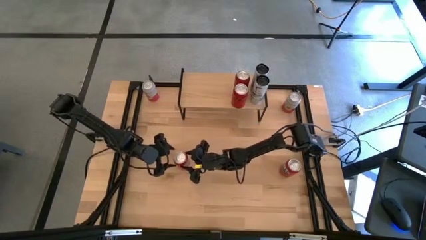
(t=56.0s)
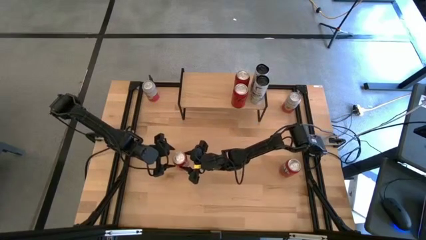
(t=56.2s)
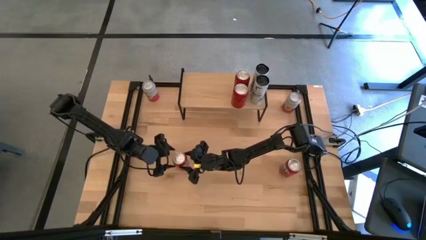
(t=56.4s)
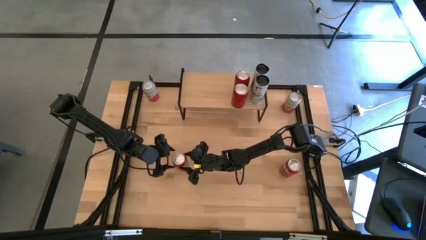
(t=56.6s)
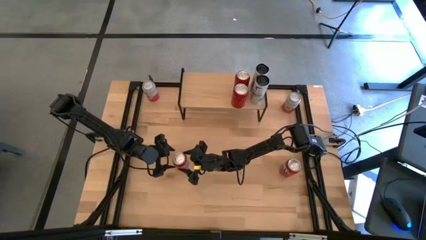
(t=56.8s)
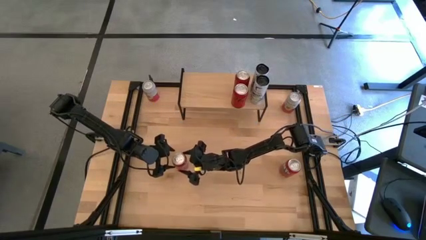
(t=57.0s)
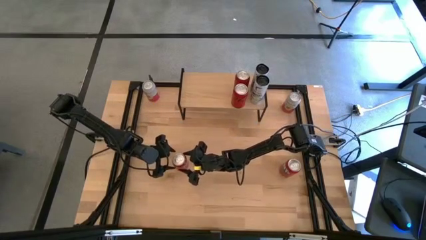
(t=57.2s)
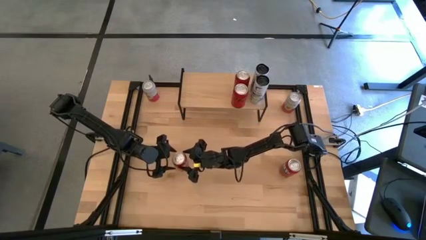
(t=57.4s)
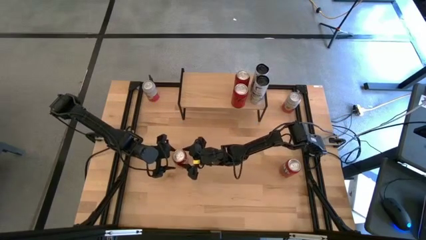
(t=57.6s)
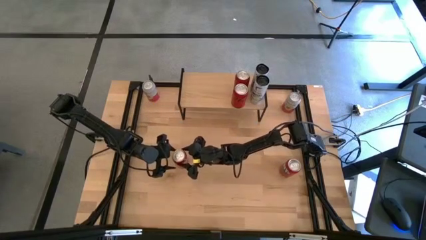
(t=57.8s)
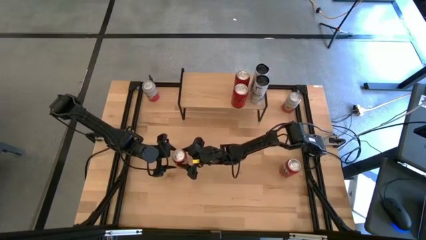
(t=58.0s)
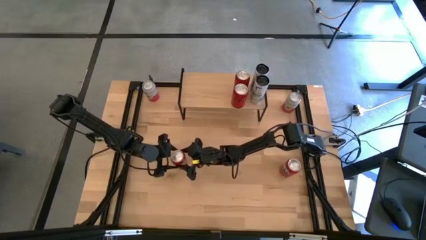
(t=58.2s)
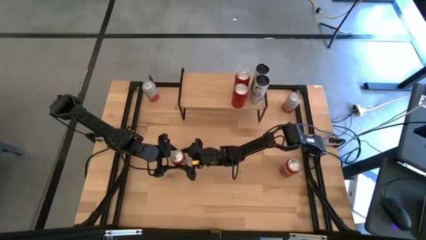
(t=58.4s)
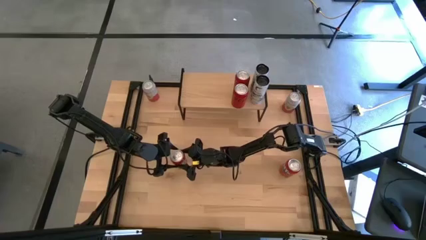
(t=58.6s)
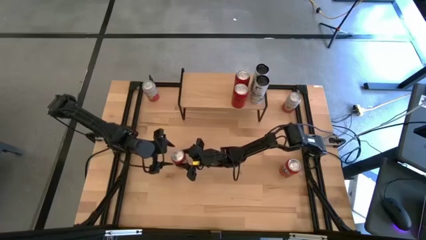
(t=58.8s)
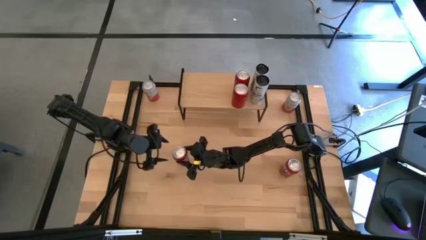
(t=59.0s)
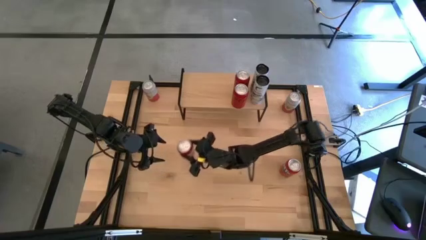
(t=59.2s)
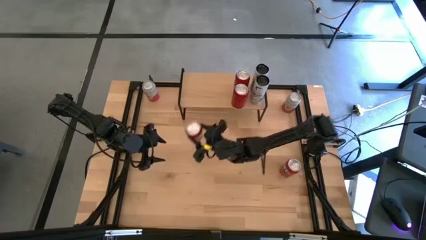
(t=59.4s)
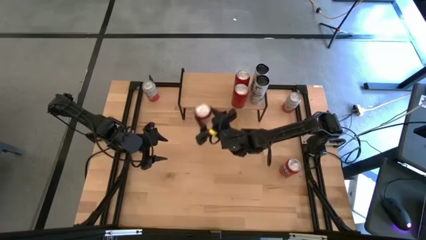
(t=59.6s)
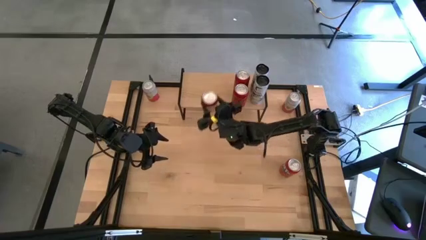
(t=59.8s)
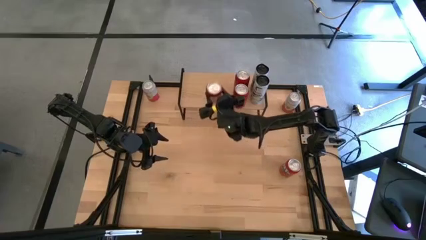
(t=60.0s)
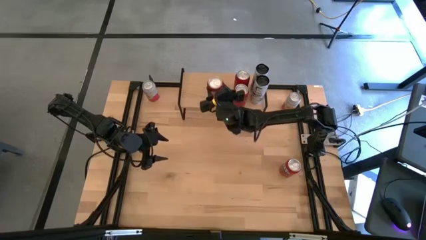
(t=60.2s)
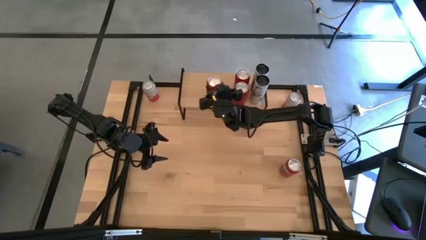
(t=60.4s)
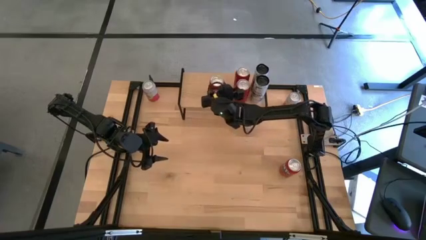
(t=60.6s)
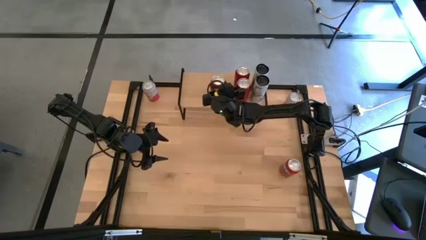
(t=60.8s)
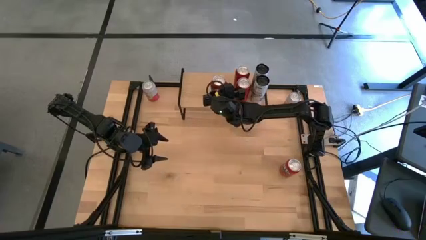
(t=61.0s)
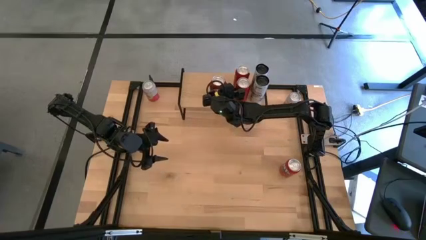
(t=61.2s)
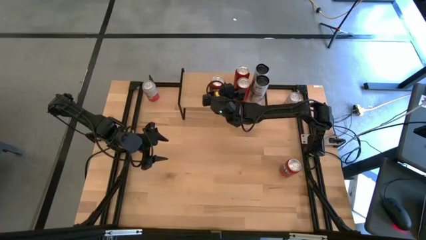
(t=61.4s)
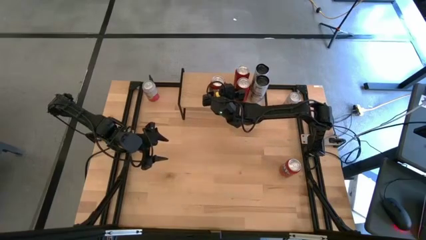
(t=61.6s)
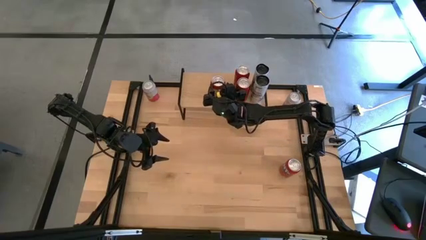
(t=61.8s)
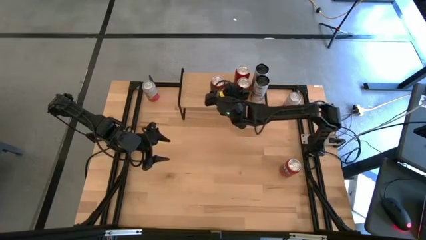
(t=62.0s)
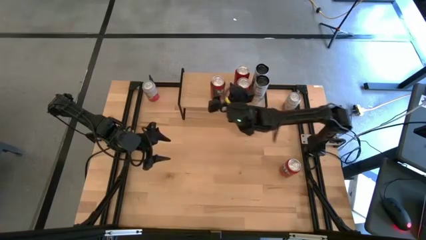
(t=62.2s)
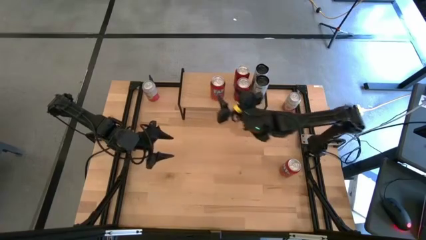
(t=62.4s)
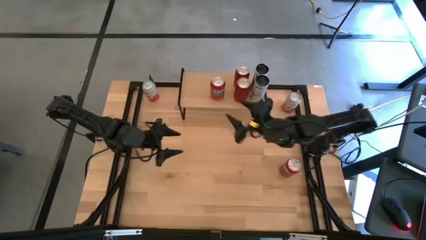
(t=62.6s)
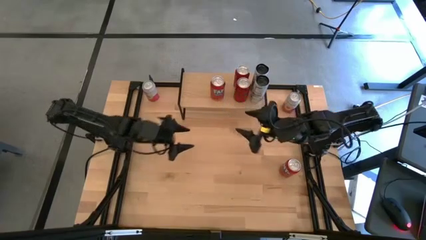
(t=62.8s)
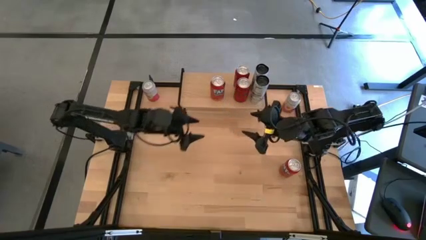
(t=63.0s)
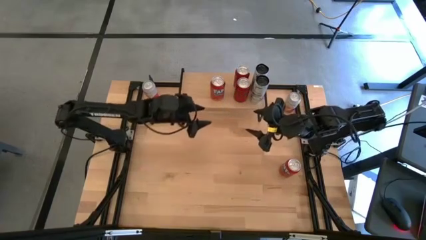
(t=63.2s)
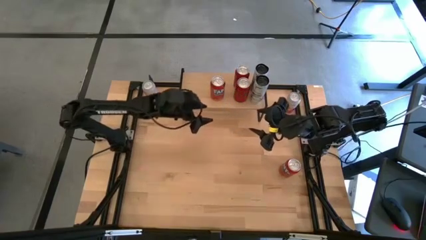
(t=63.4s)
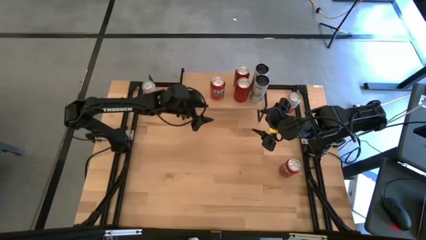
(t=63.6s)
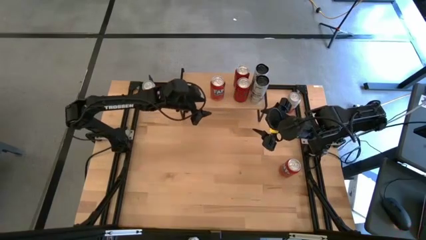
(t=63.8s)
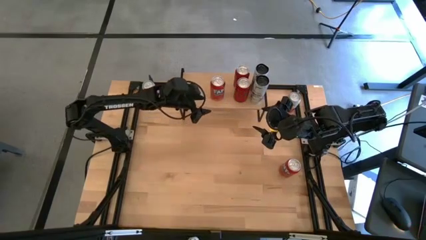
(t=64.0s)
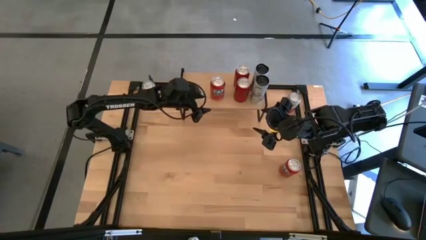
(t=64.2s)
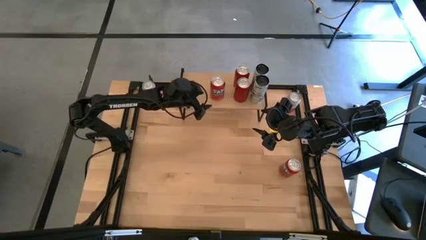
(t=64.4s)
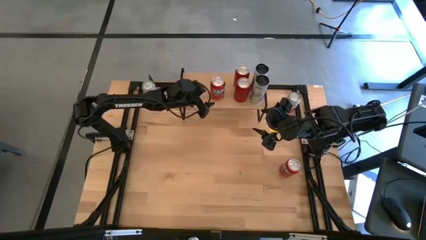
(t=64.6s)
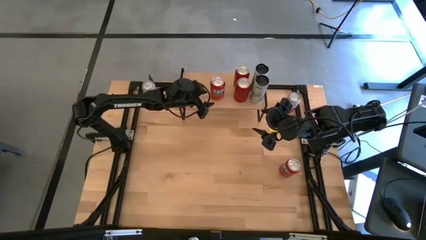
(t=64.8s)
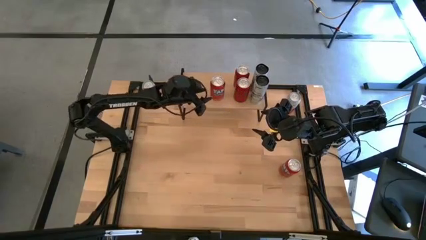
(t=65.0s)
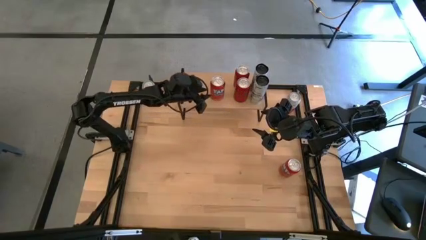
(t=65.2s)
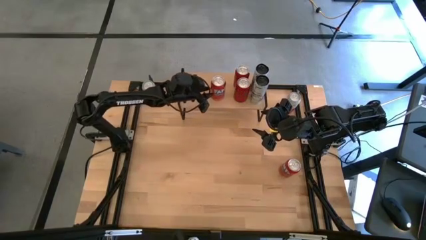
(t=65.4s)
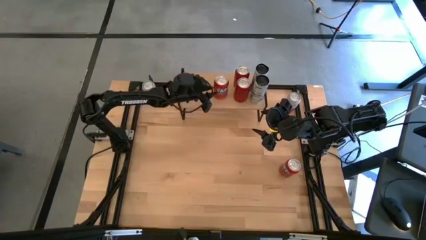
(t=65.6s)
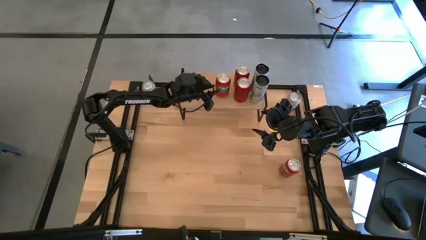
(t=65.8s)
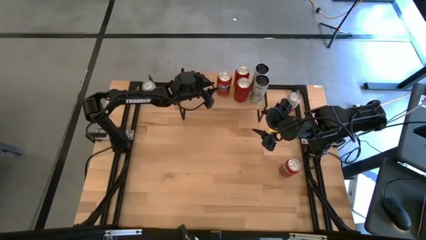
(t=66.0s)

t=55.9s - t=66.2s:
Task: Place canned beverage on shelf
Put the left red soda can on the shelf

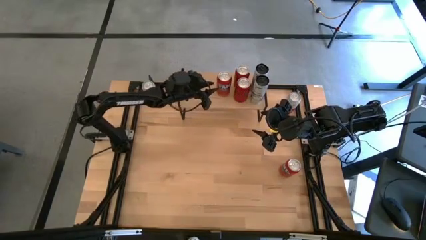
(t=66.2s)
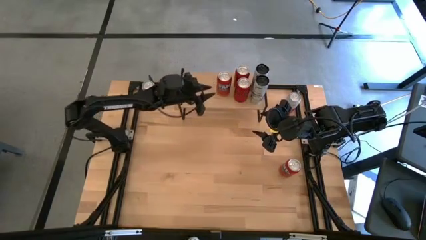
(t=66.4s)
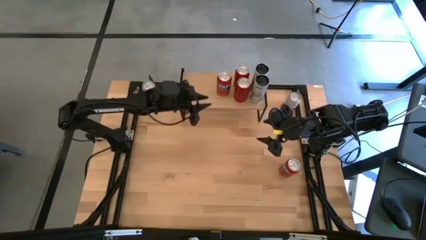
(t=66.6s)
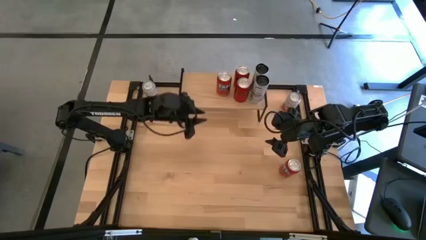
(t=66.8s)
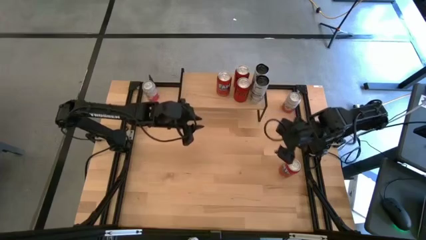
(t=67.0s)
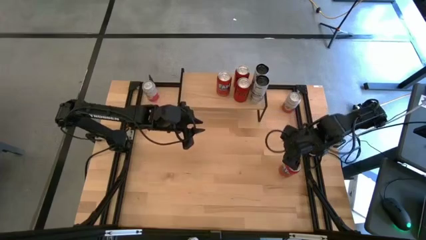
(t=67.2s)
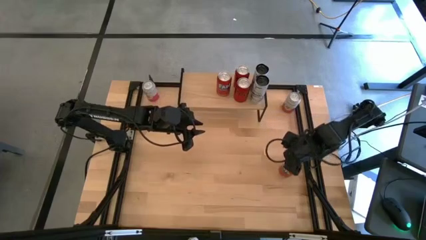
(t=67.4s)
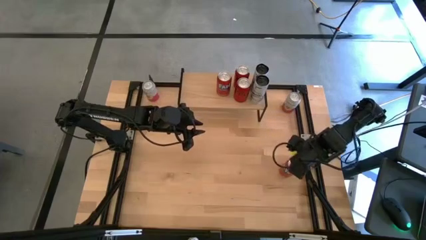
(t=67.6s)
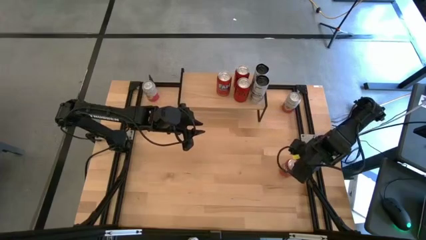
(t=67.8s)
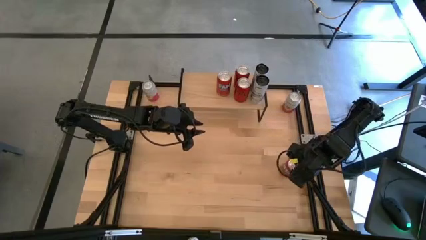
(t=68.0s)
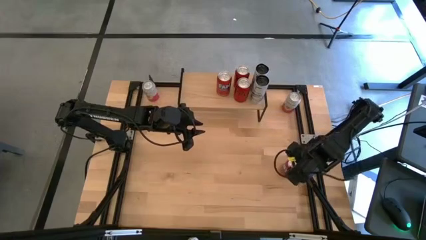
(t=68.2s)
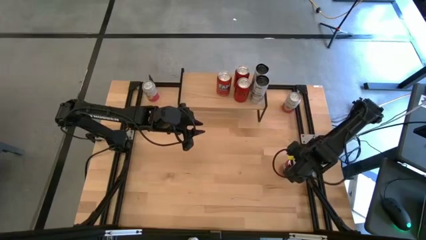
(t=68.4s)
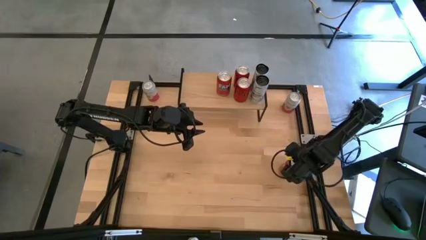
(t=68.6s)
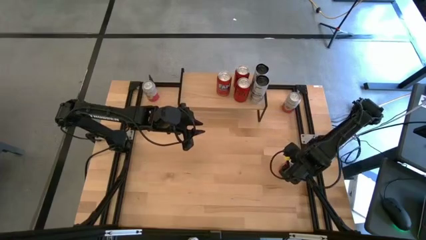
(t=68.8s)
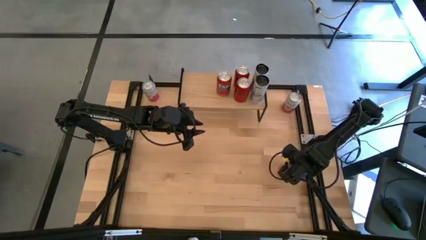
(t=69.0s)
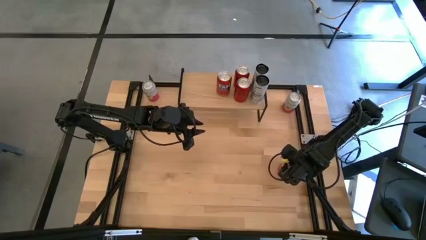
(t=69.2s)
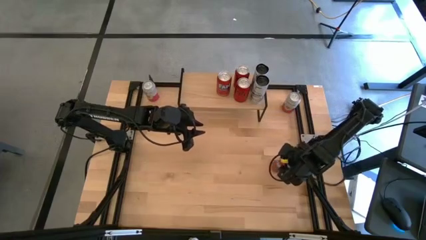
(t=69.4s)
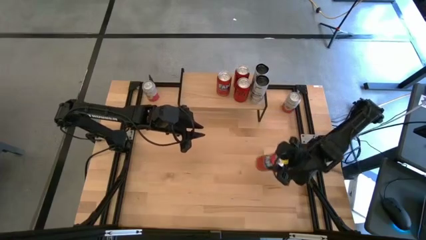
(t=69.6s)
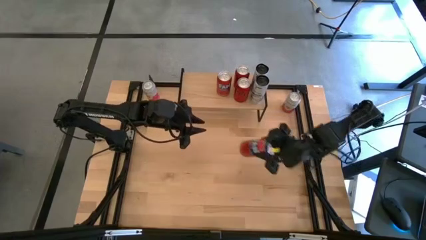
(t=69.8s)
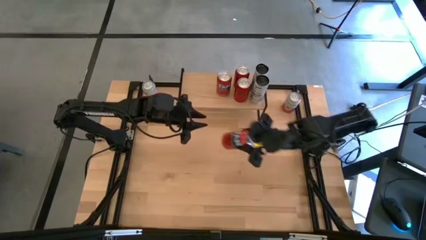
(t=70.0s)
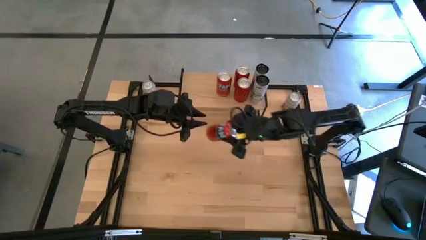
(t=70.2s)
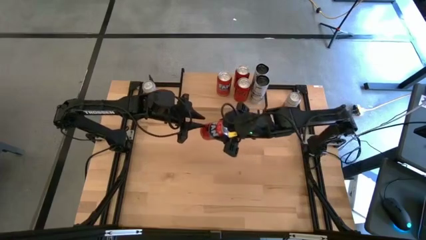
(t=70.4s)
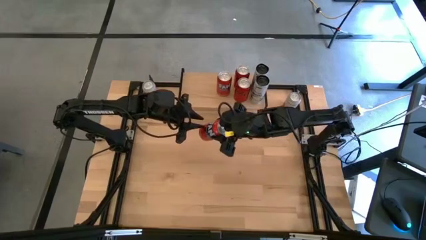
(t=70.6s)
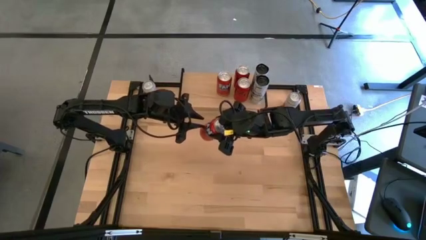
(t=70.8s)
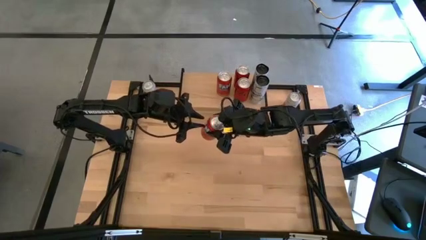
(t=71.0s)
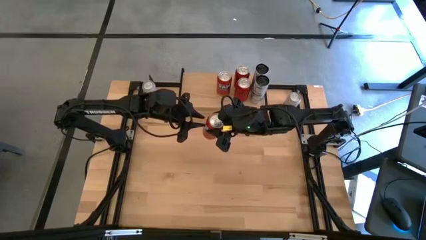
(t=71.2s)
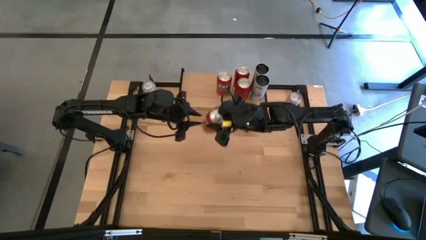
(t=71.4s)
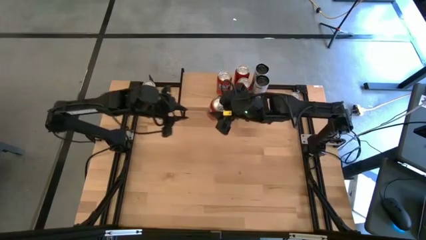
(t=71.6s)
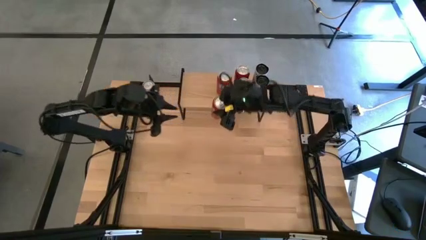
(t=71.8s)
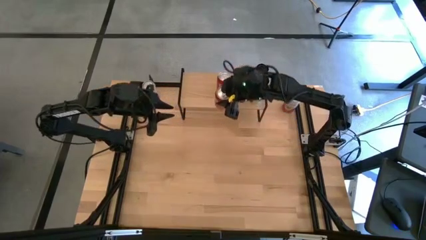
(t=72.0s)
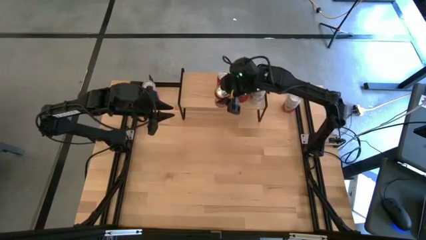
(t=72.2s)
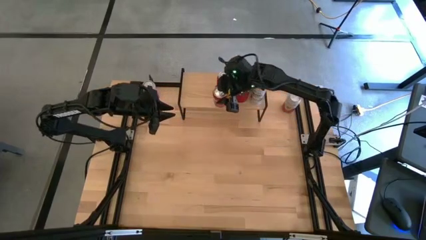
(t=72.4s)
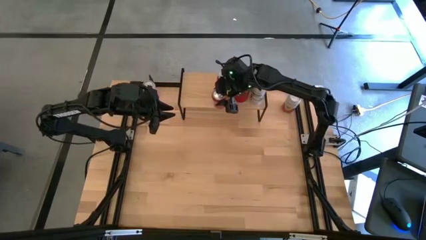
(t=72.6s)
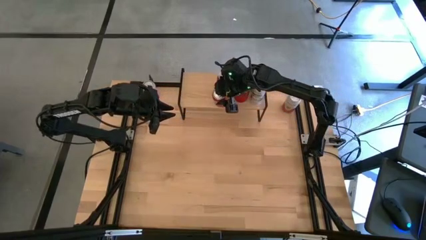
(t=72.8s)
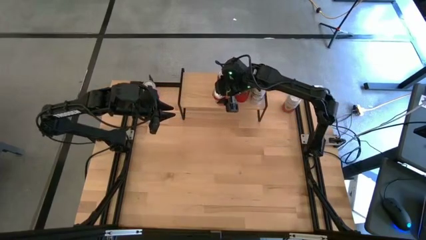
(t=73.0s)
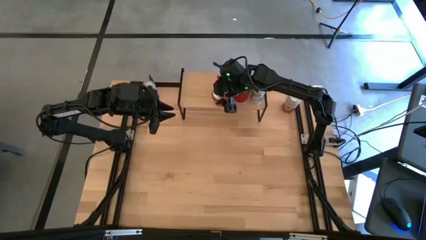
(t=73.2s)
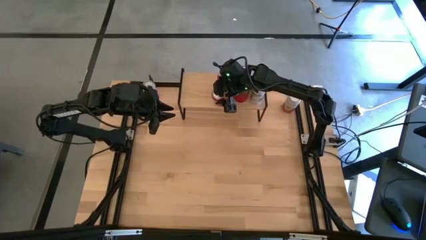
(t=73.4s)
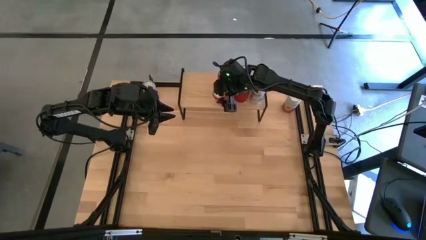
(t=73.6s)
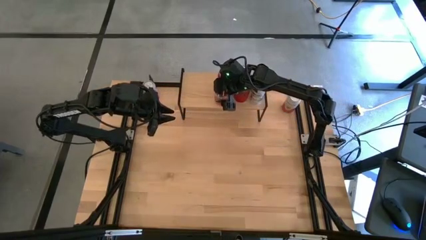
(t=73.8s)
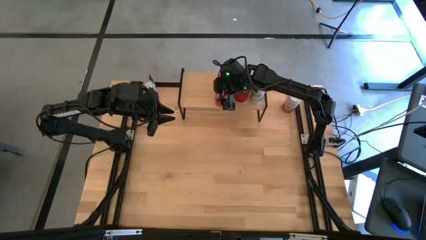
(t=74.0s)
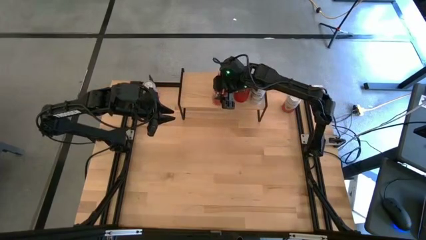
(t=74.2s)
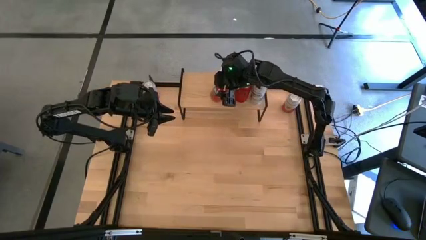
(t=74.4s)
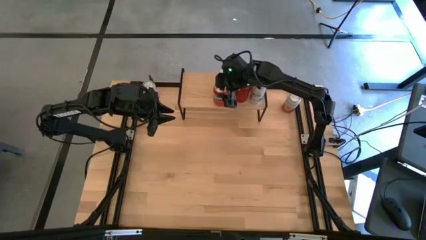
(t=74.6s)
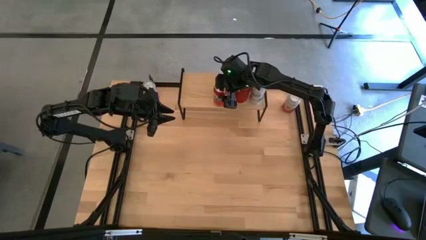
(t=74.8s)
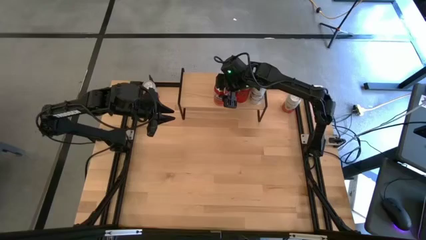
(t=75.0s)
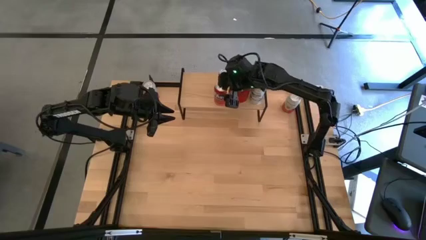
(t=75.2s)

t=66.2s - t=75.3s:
Put the red soda can on the shelf aligned with the other red soda can
